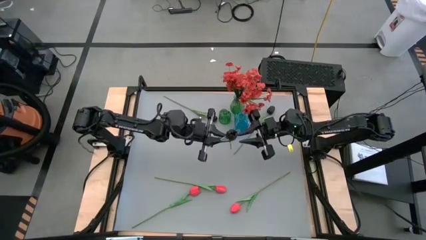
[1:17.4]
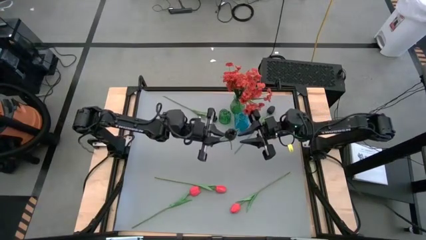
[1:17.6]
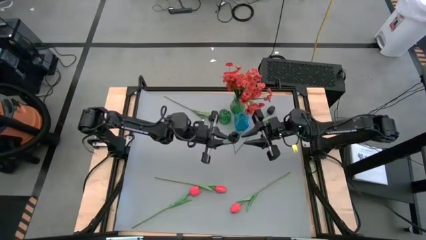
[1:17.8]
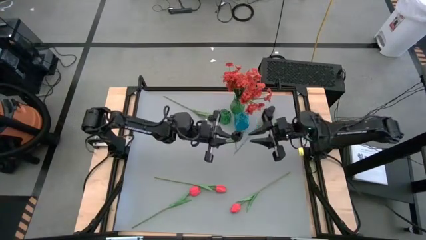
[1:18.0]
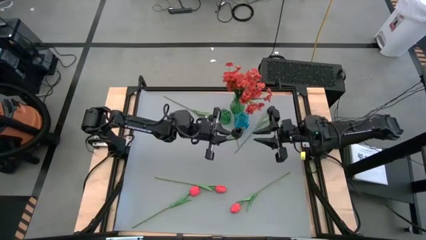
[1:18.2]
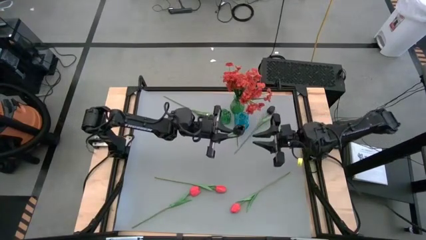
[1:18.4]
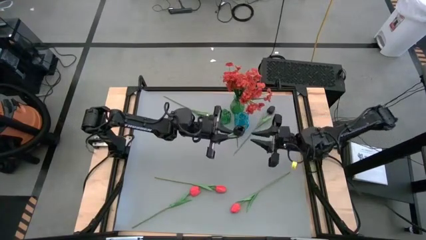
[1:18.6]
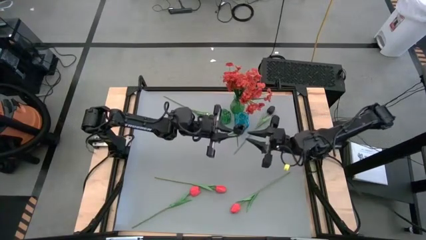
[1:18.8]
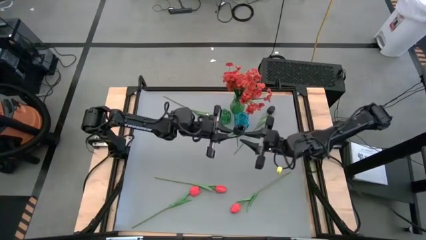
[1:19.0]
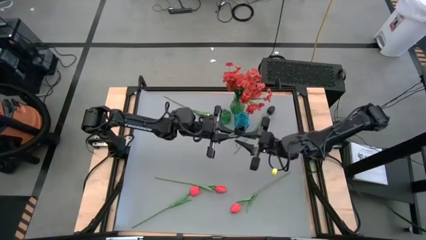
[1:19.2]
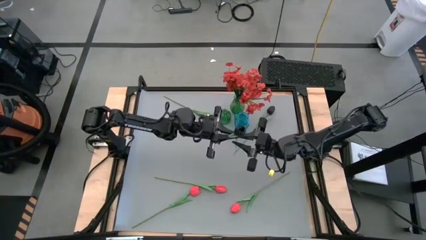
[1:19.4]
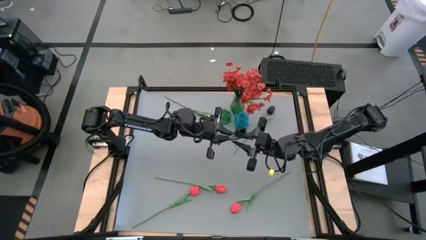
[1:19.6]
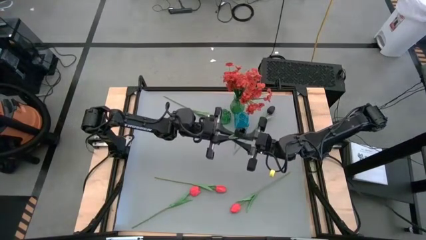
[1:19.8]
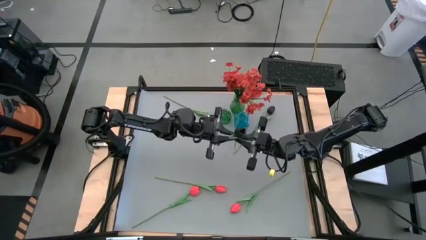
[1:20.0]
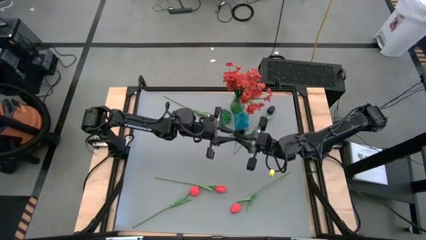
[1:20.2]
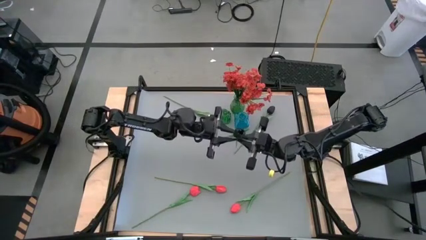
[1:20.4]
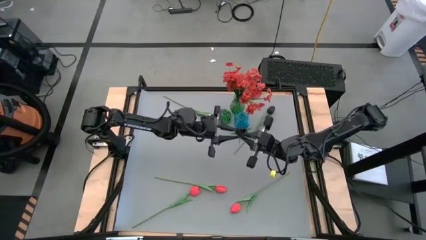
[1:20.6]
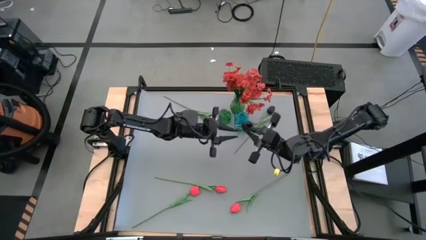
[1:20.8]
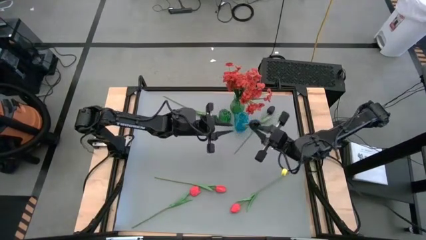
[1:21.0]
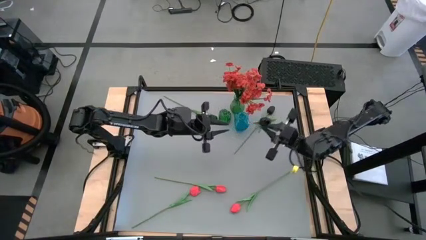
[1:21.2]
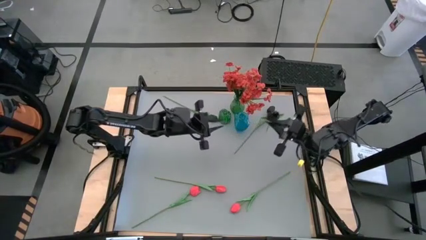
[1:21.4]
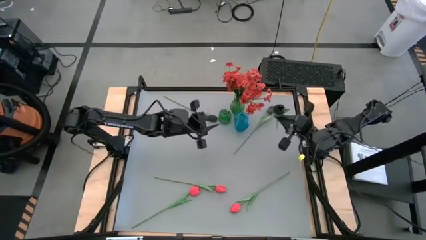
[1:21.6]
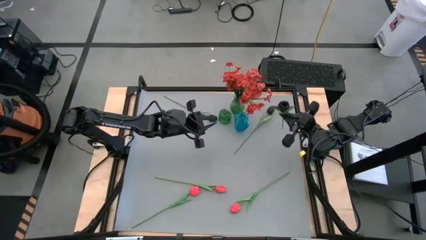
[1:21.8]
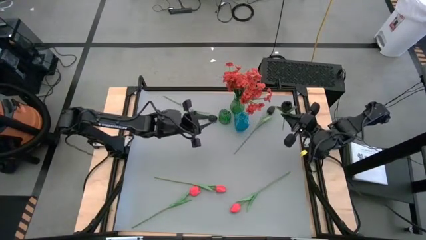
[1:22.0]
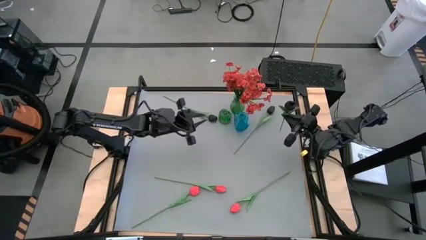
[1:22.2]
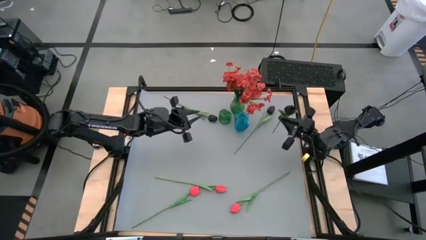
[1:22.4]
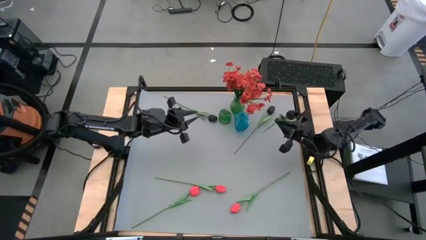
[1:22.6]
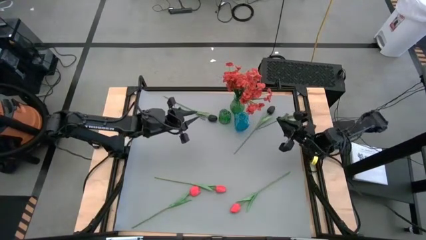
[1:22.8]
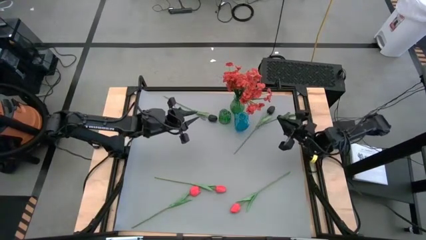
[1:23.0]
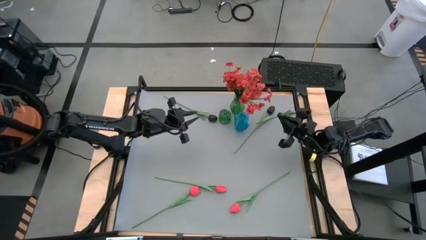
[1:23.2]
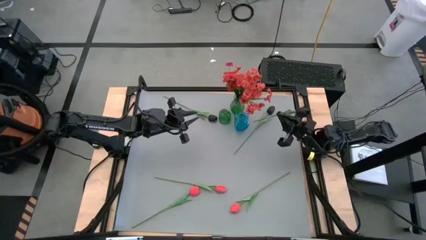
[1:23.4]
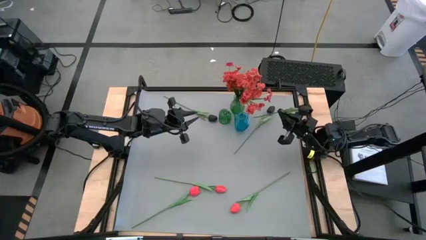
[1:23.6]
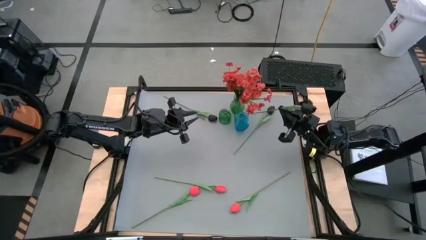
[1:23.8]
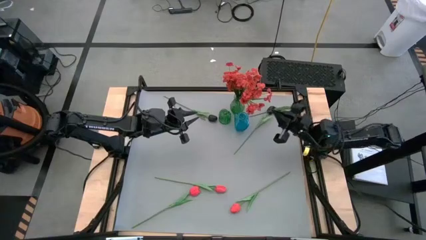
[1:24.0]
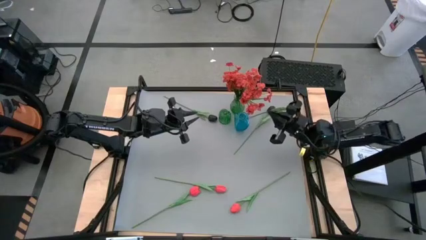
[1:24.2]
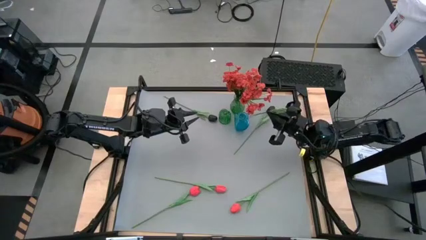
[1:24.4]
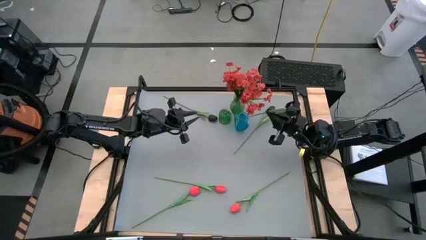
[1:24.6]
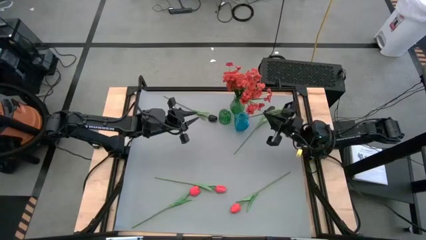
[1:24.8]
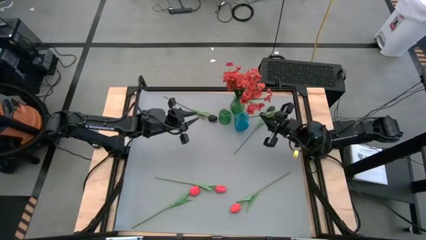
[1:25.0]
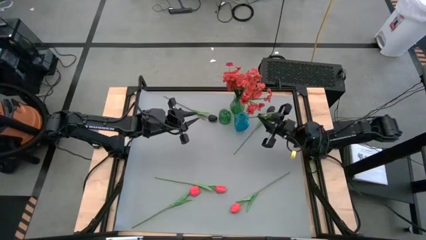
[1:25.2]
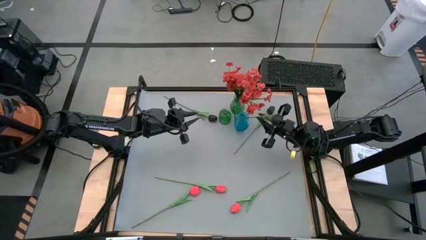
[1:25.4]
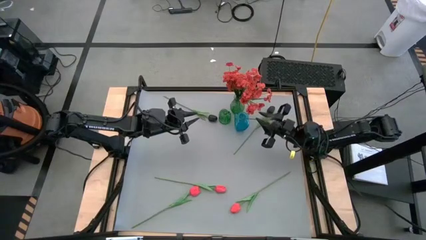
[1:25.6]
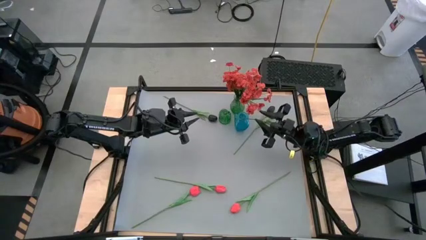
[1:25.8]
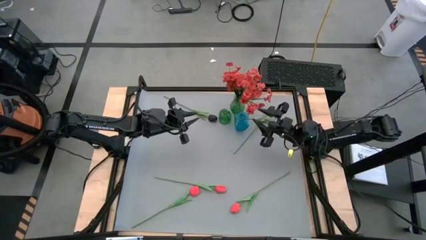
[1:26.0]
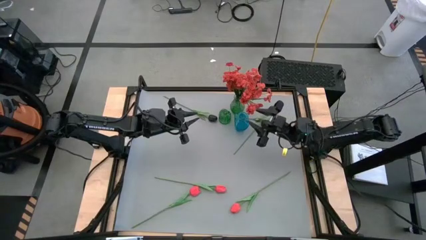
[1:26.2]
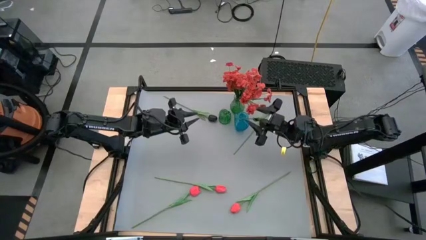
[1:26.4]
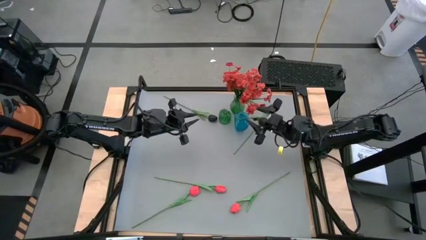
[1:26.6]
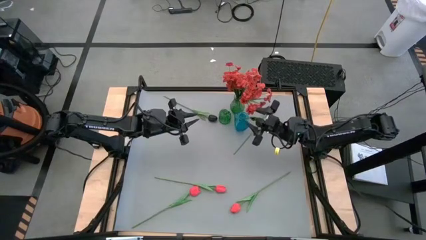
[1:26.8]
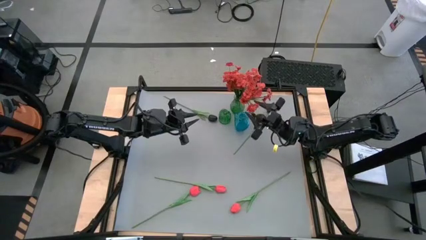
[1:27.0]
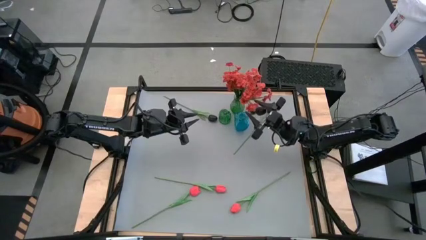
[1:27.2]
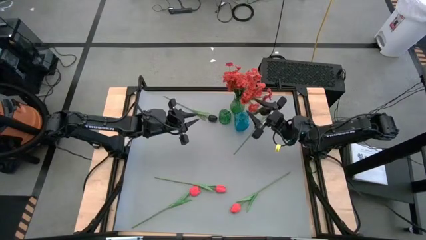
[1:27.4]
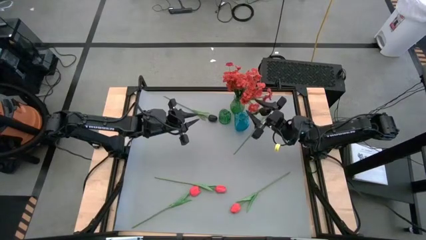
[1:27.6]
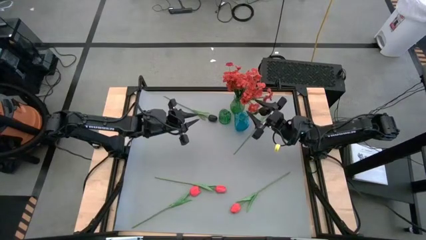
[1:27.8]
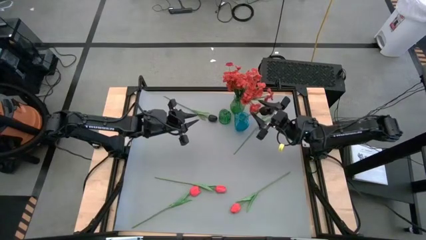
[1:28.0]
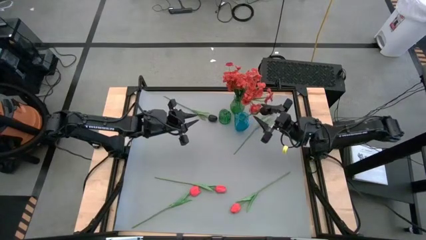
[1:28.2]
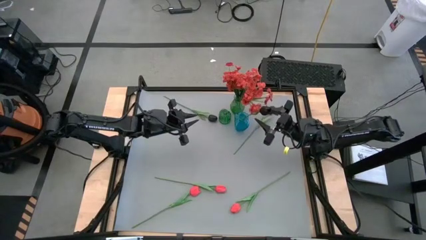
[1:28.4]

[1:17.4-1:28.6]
Task: Sort flowers into vase by color
Put the bottom left black flower into the blue vase

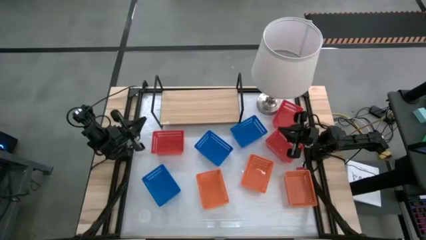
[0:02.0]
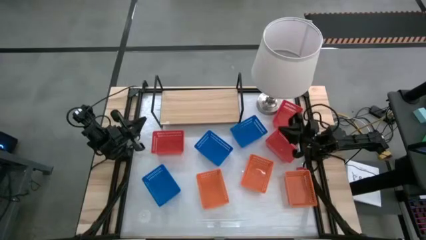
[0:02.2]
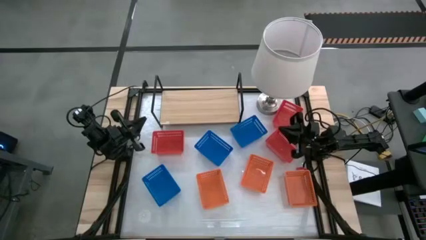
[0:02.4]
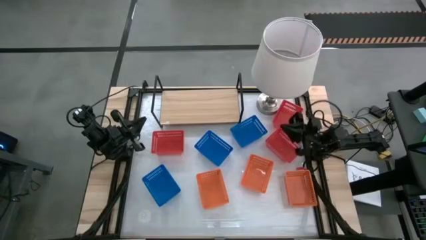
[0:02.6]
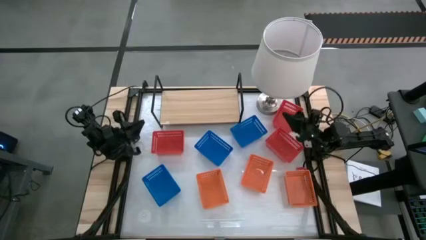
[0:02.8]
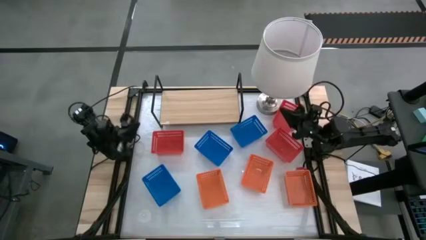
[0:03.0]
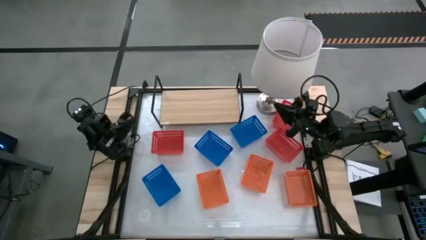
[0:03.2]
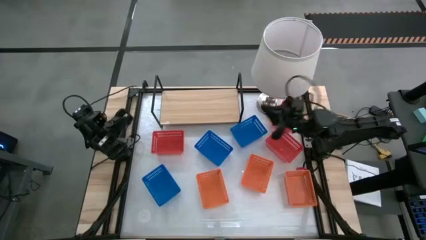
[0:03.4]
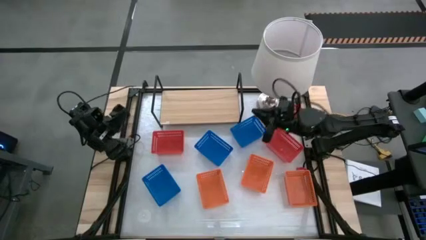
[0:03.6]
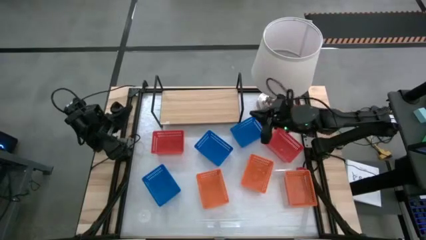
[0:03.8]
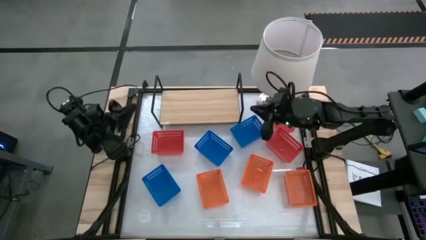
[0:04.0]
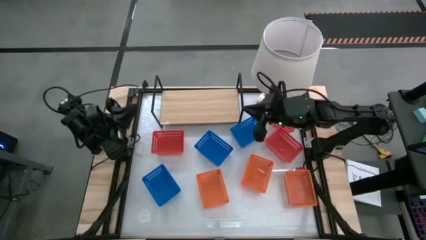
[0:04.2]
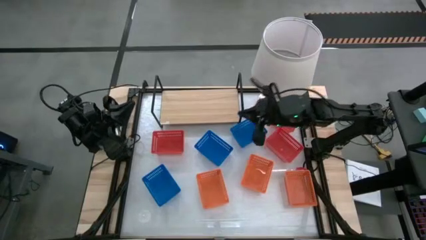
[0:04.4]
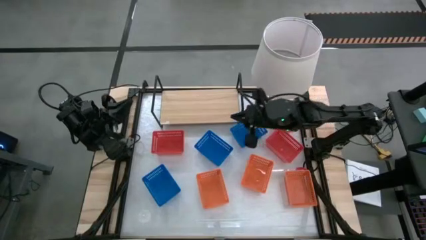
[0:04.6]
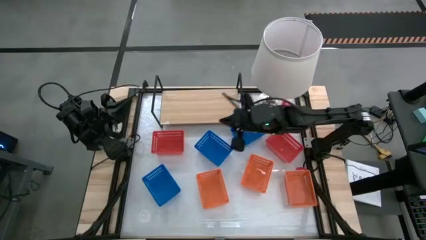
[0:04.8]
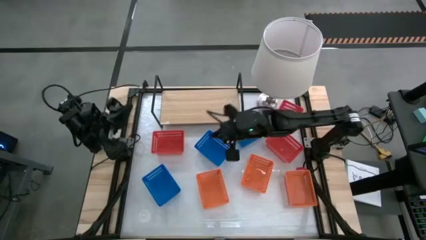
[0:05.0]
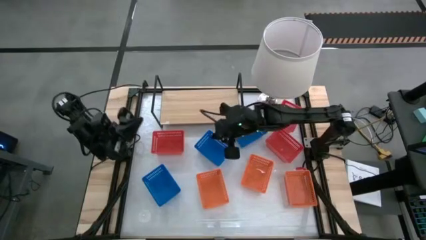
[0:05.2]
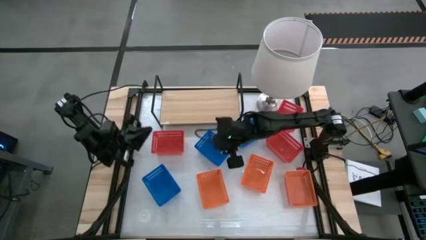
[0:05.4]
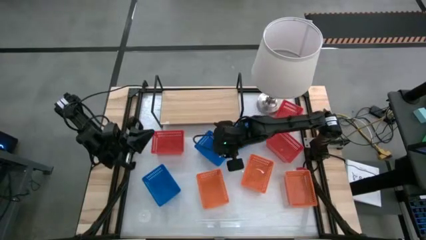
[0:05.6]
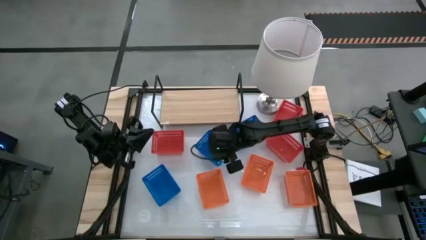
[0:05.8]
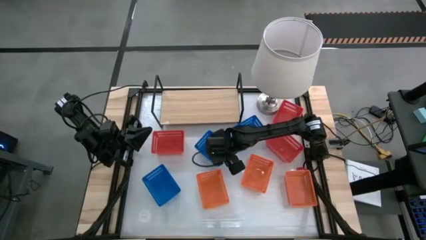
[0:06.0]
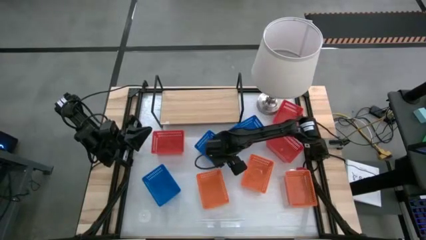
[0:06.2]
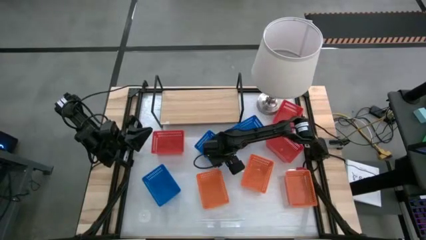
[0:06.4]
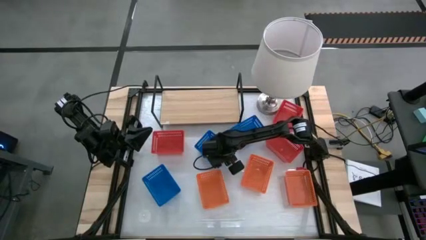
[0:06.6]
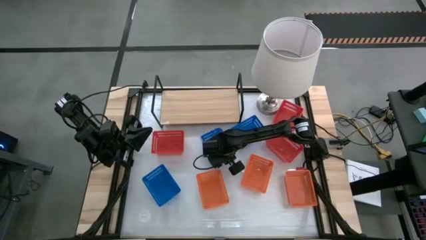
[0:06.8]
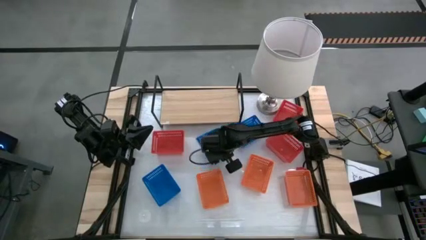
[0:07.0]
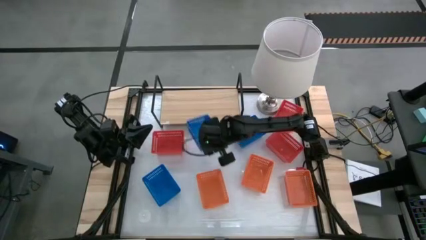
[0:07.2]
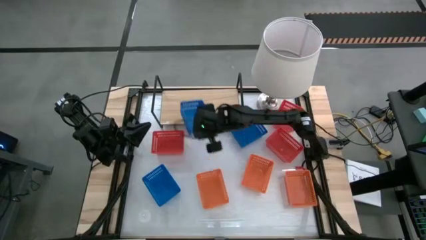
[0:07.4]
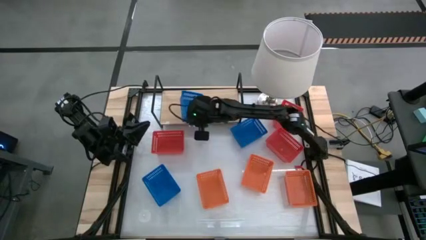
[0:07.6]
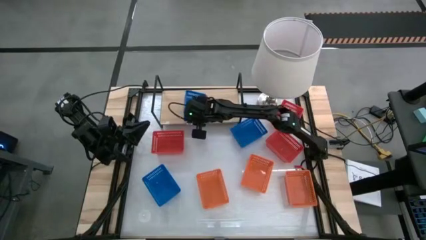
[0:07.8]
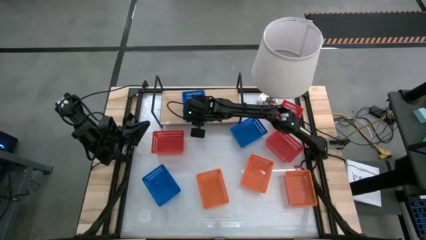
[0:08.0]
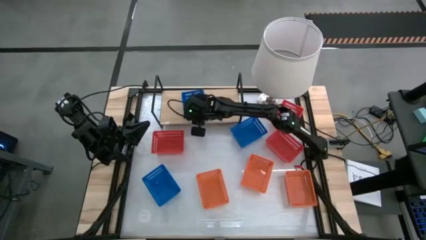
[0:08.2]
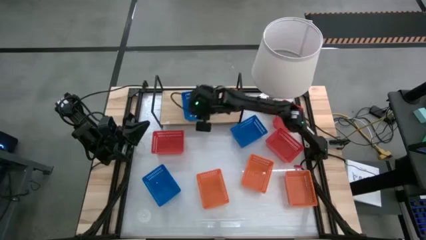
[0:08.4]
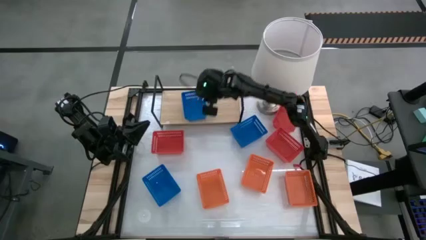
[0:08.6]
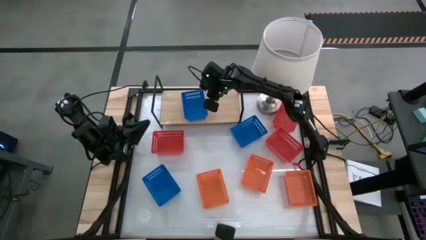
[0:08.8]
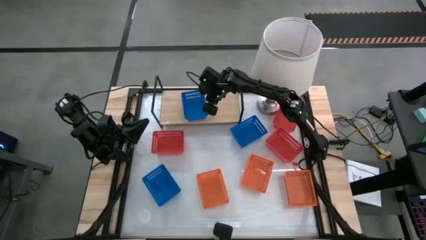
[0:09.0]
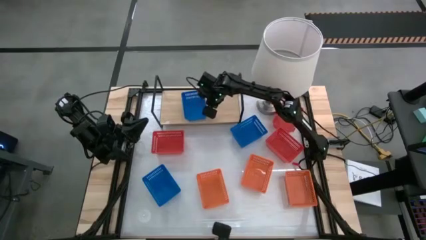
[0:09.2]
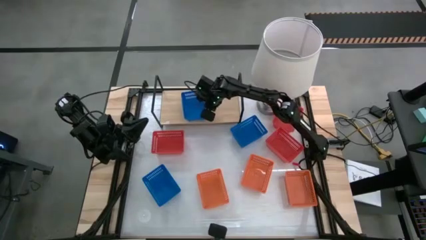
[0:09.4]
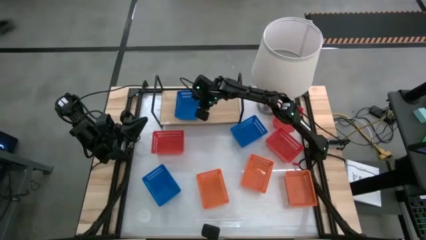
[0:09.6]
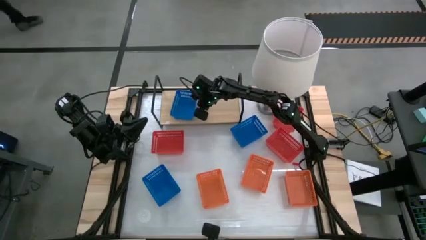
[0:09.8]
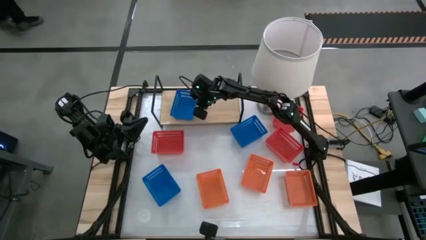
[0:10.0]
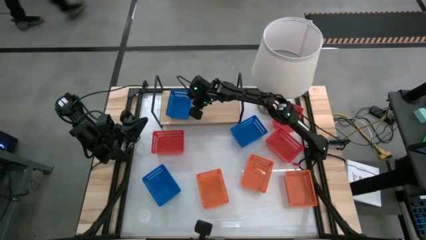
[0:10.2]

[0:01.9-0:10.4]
Task: Stack baskets on shelf by color
Put the top left blue basket on the shelf
